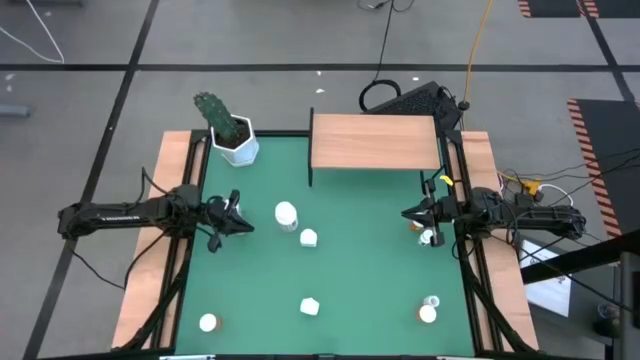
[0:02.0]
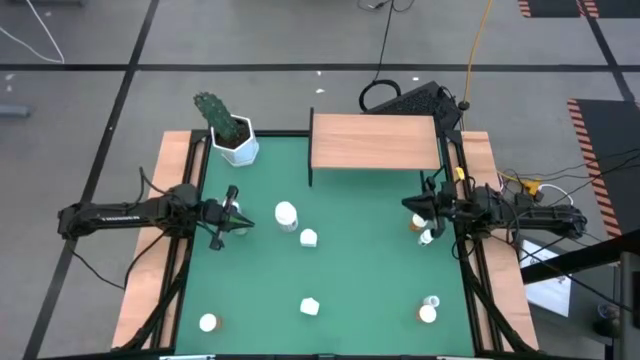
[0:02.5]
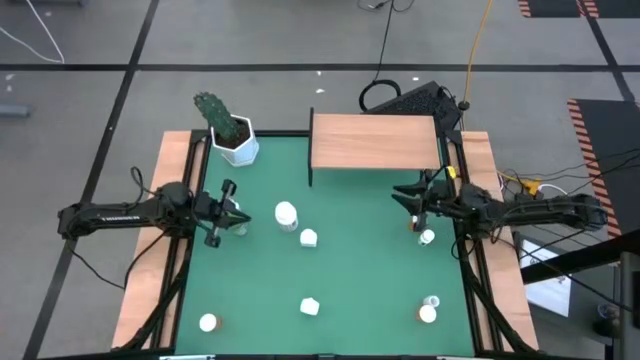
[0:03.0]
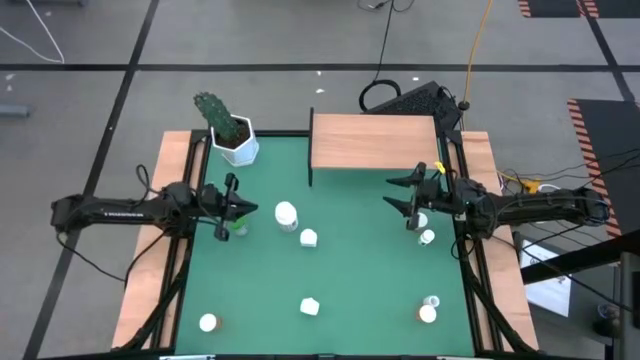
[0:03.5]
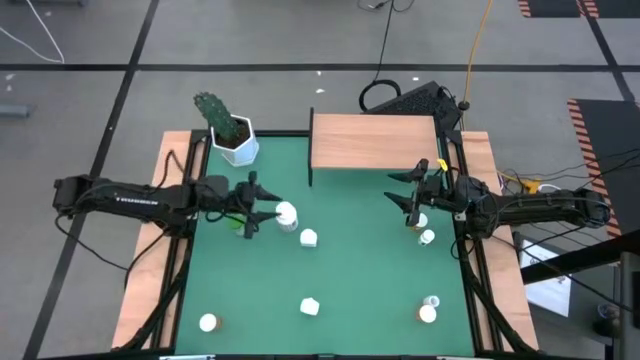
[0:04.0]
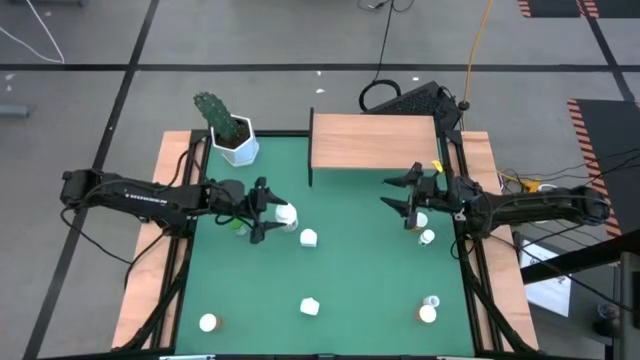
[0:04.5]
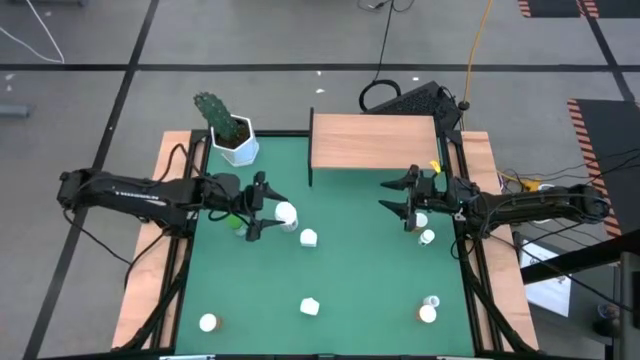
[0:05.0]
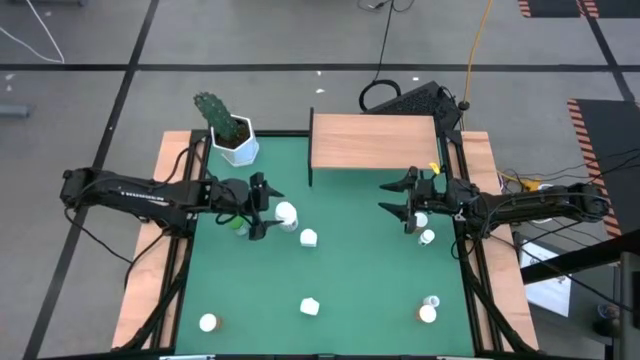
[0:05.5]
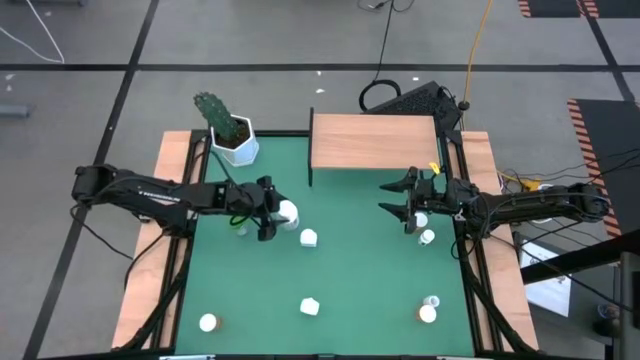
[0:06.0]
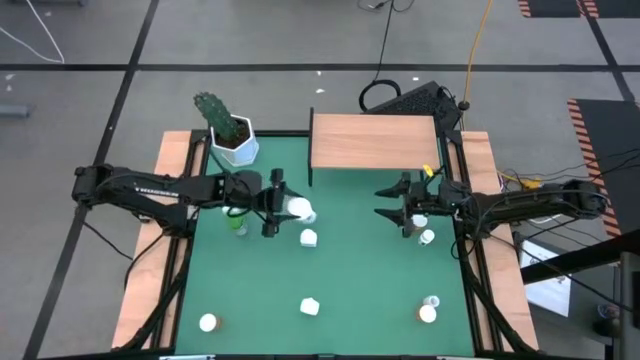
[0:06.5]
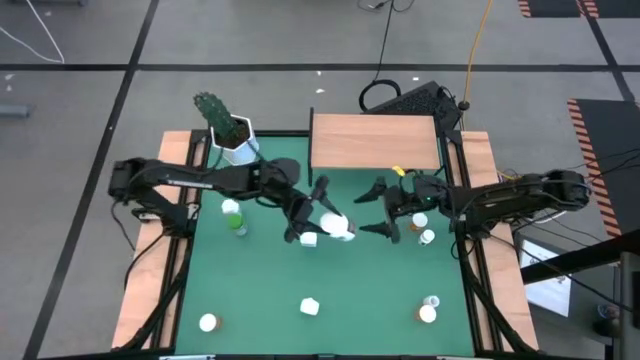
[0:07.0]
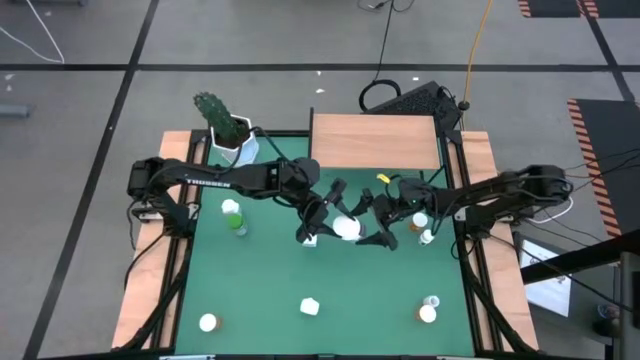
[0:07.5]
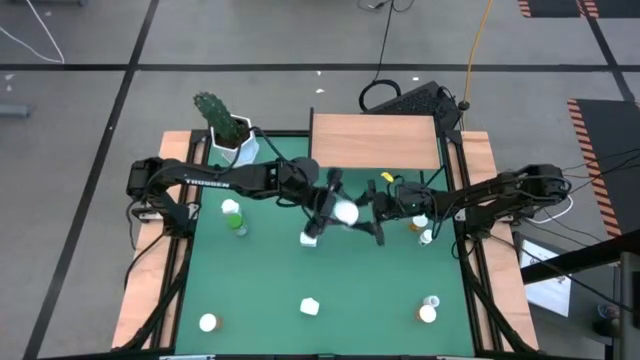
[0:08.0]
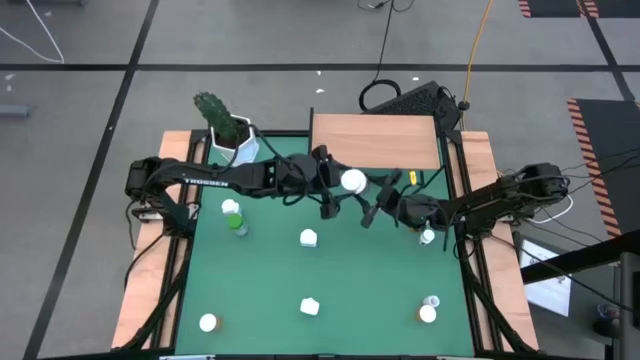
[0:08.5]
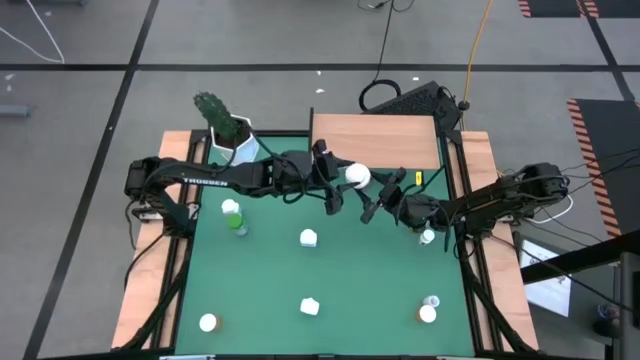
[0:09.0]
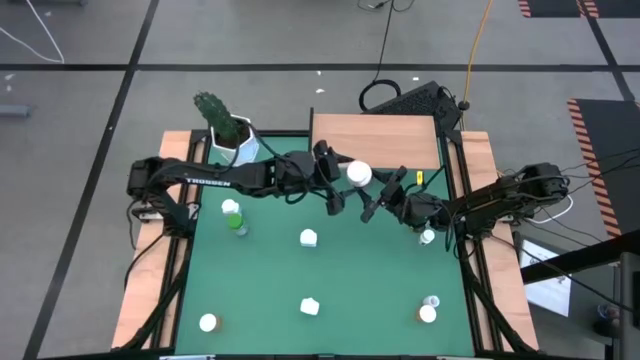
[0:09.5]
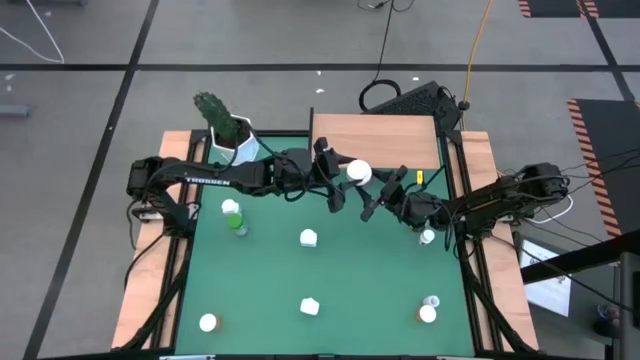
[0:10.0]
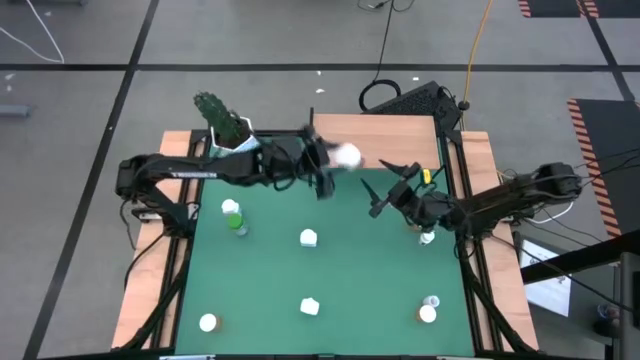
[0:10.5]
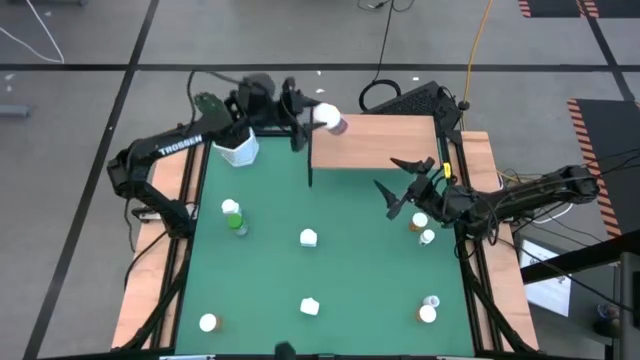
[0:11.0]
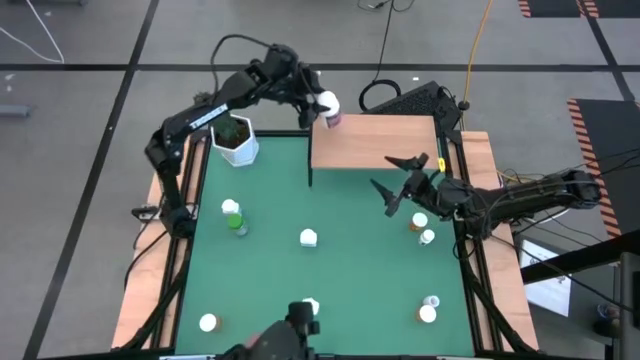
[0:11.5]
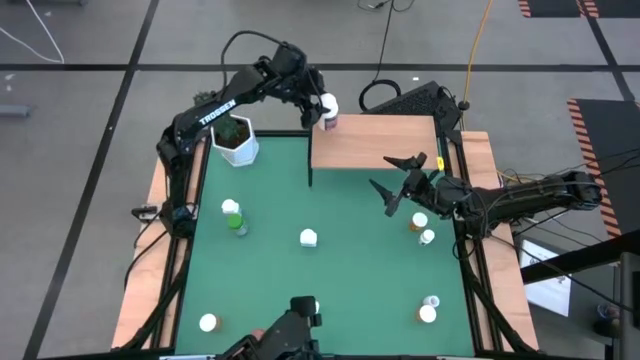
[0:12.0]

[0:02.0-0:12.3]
Task: Pick and place medicine bottles onto shelf by color
Put the purple pill bottle on the shelf

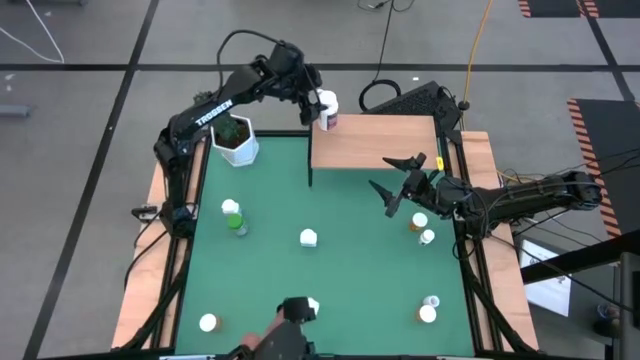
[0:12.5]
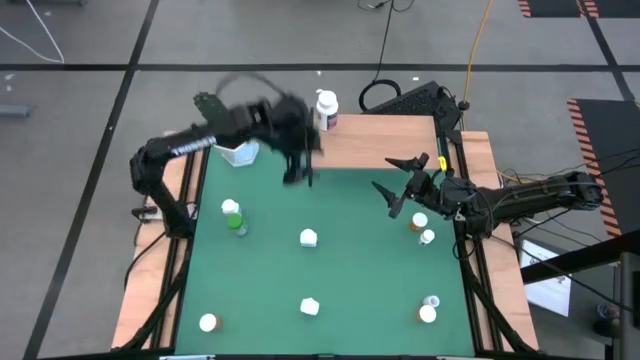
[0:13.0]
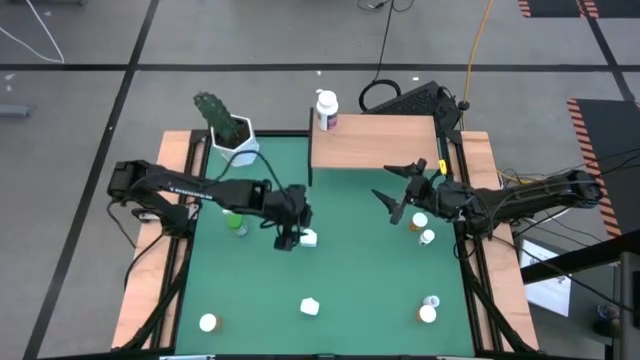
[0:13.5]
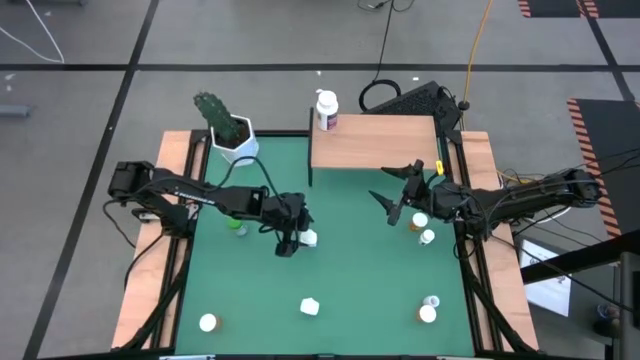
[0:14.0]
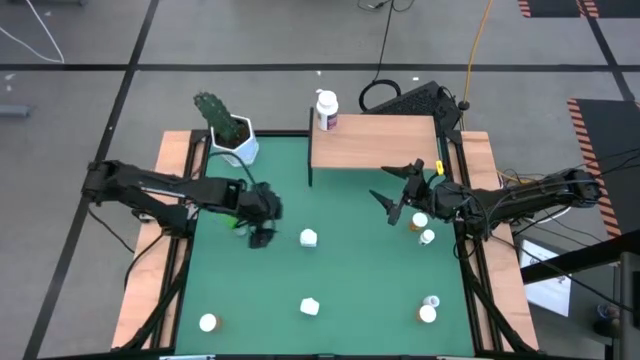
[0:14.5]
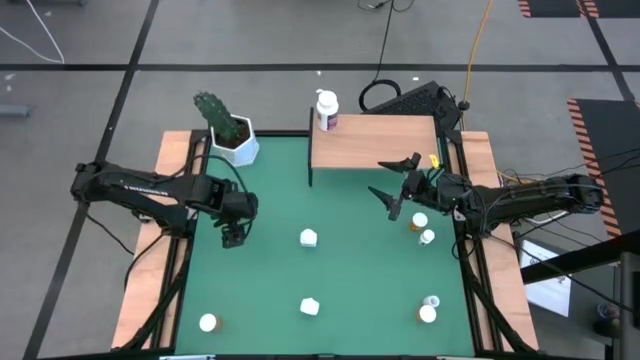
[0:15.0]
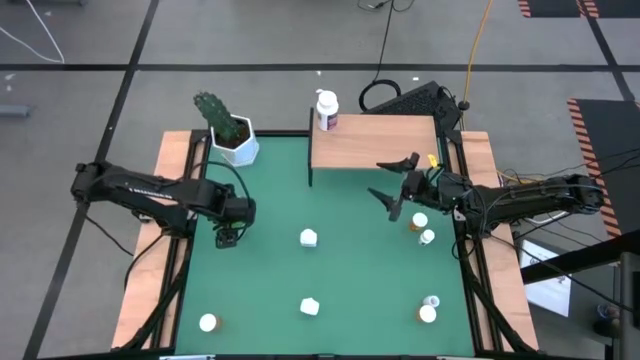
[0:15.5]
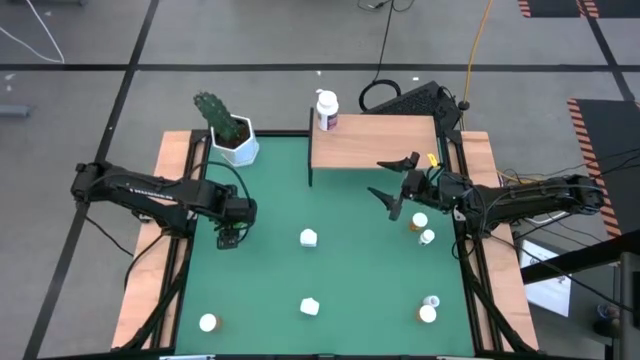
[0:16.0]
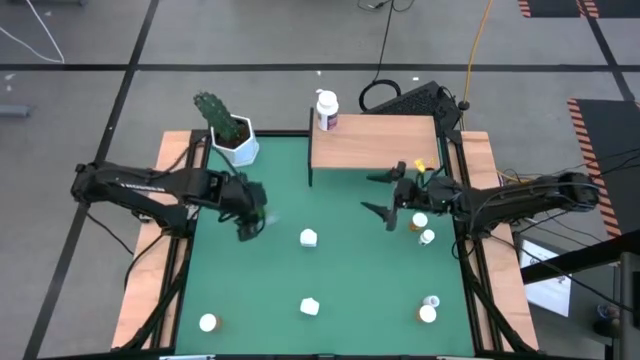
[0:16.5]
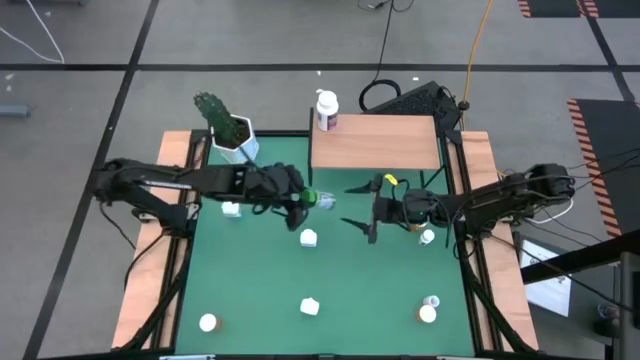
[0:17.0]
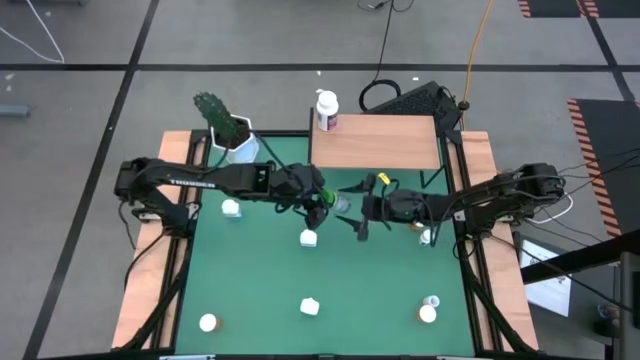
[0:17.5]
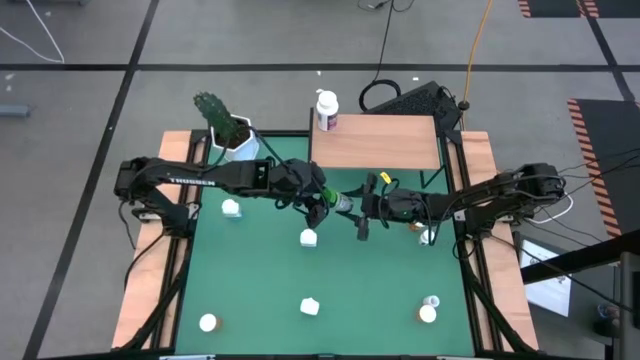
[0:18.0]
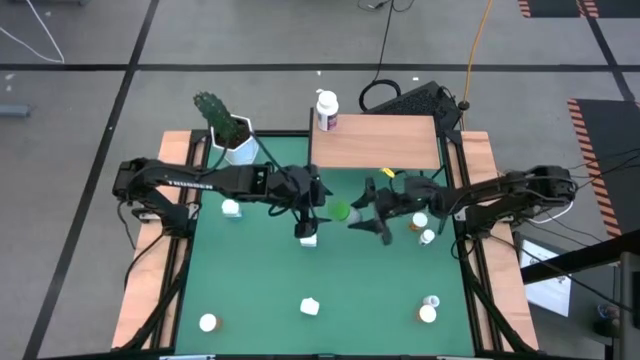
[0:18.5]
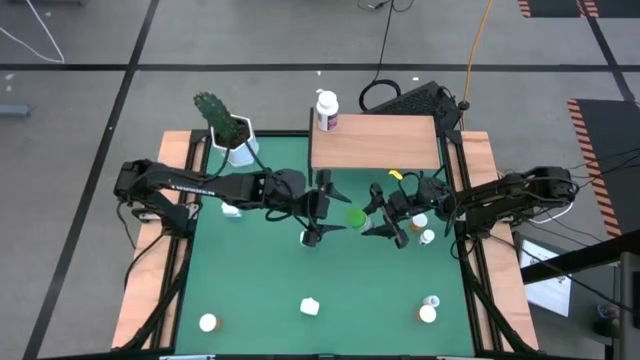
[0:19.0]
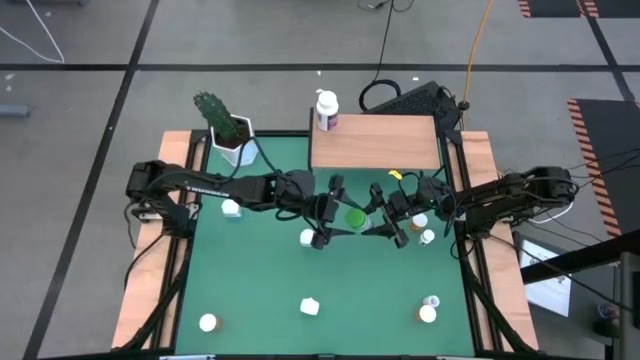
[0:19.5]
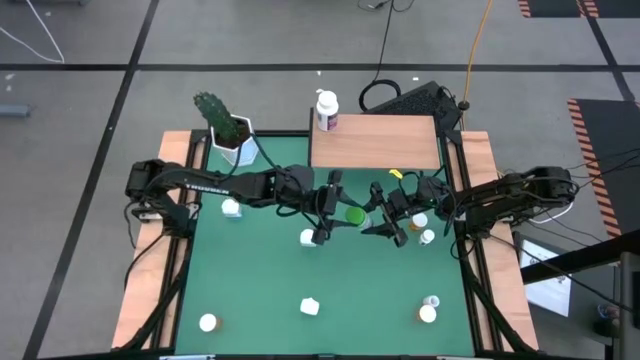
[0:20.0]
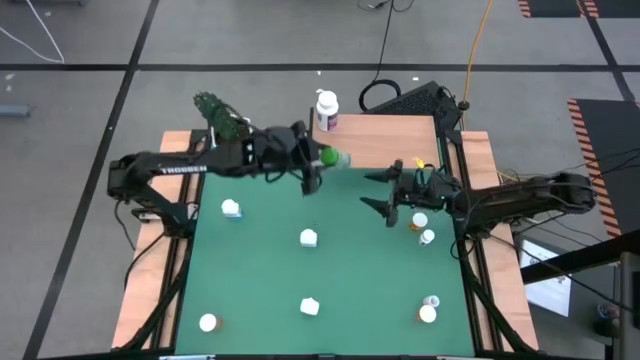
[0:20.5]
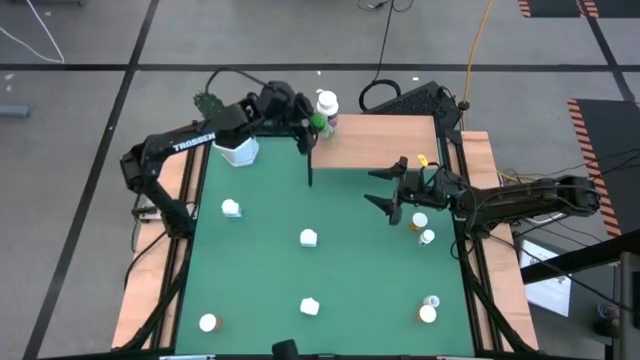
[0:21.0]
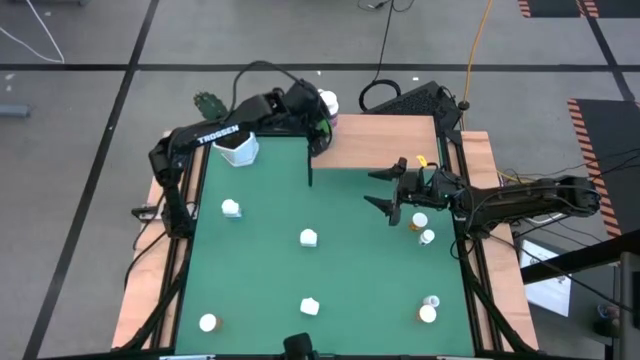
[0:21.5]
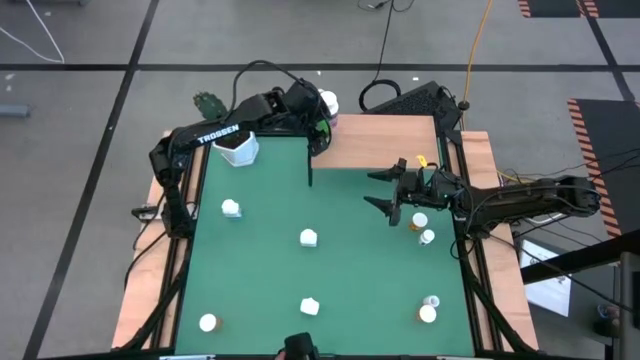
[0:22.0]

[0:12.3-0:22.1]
Put the green pill bottle on the shelf
